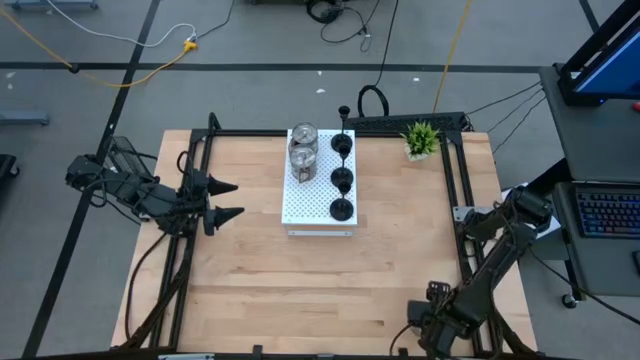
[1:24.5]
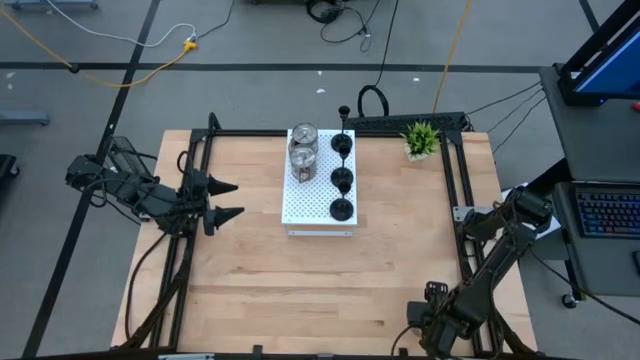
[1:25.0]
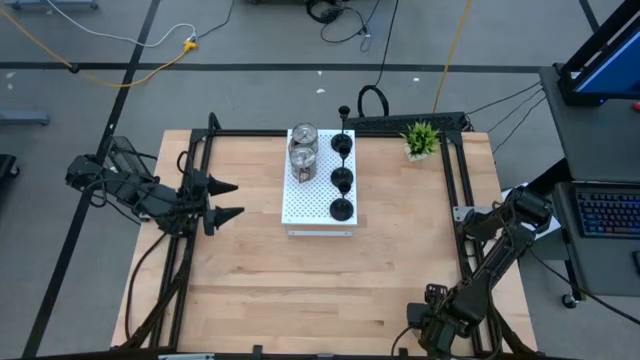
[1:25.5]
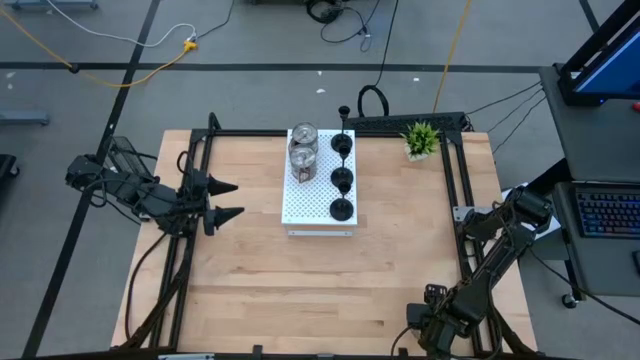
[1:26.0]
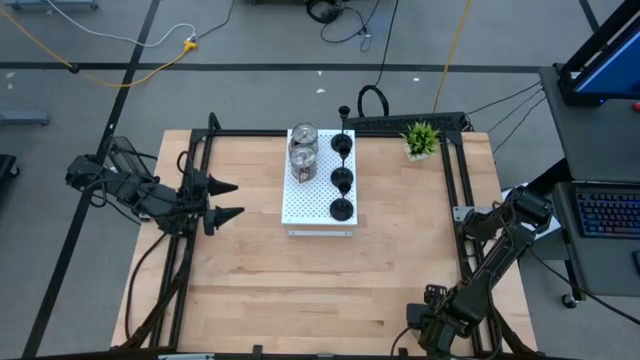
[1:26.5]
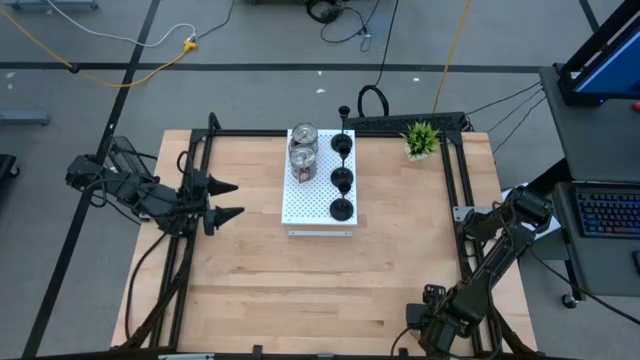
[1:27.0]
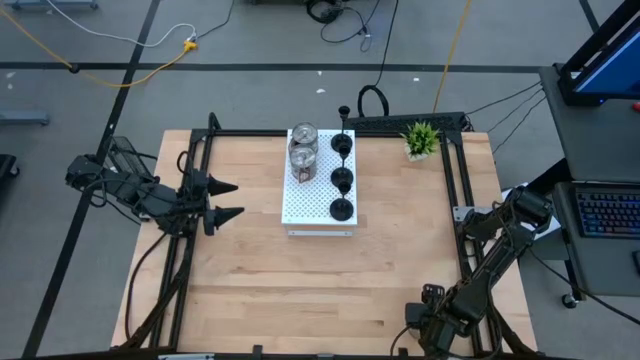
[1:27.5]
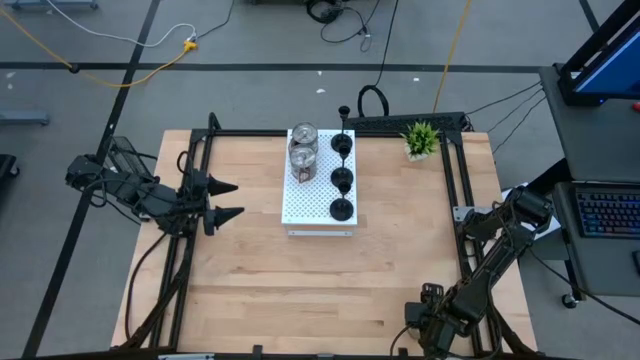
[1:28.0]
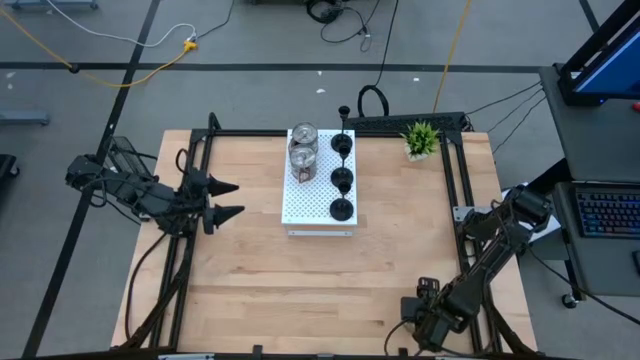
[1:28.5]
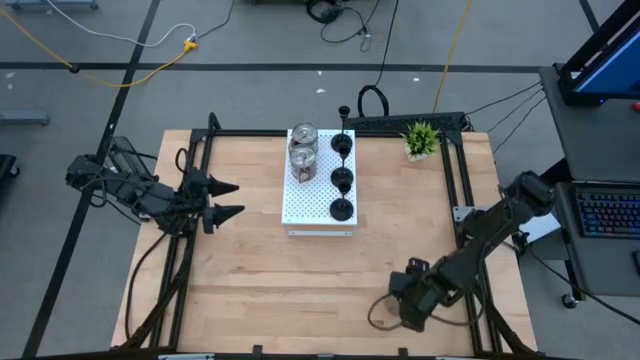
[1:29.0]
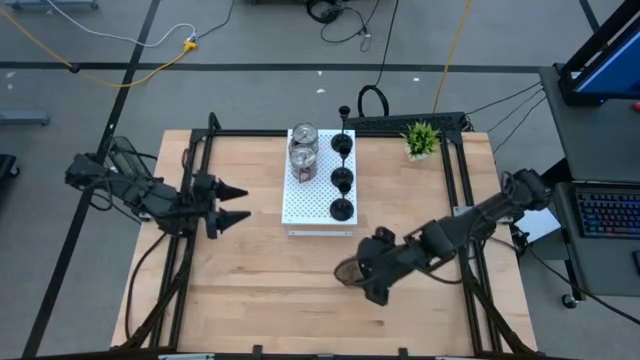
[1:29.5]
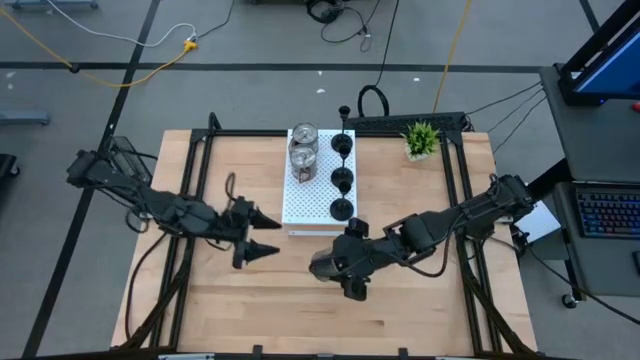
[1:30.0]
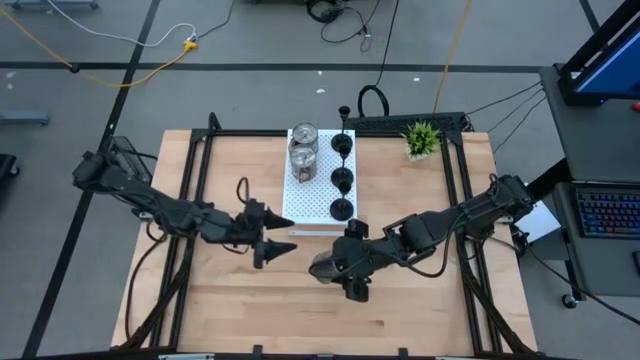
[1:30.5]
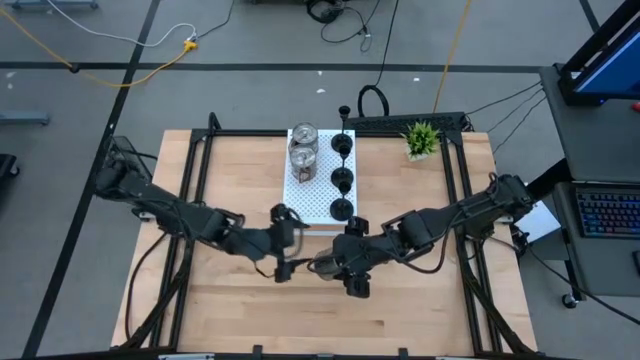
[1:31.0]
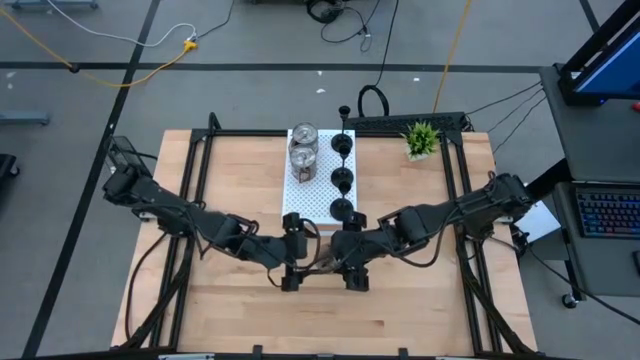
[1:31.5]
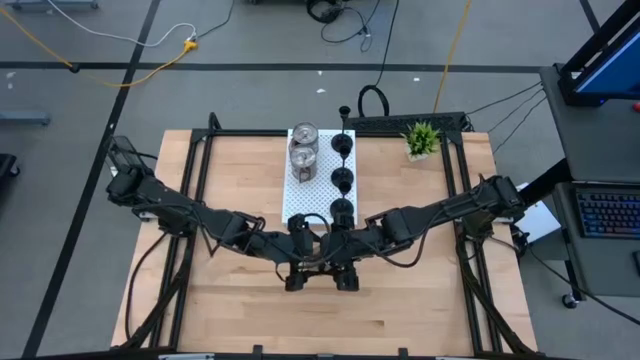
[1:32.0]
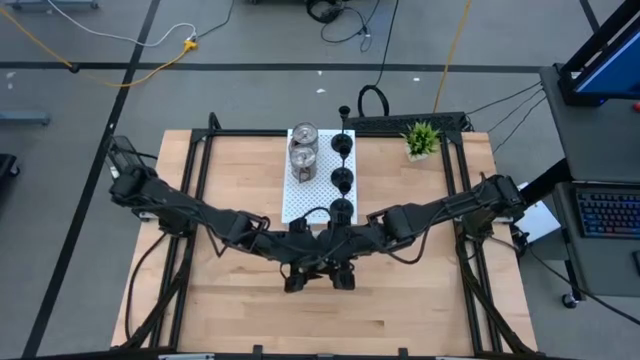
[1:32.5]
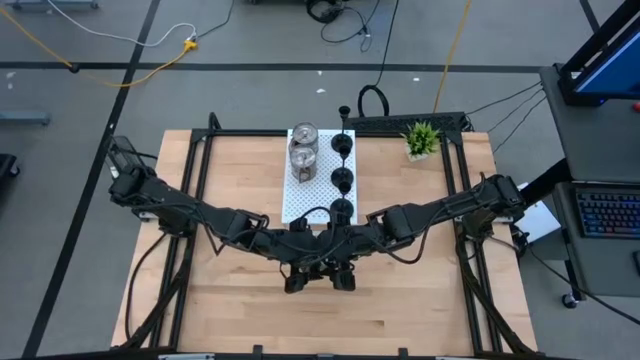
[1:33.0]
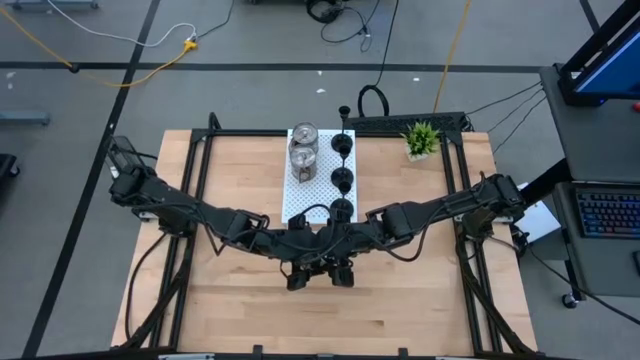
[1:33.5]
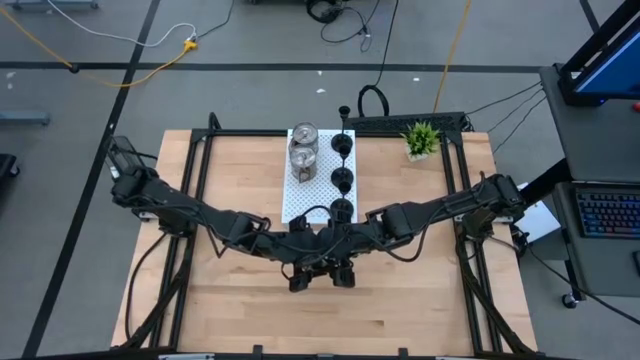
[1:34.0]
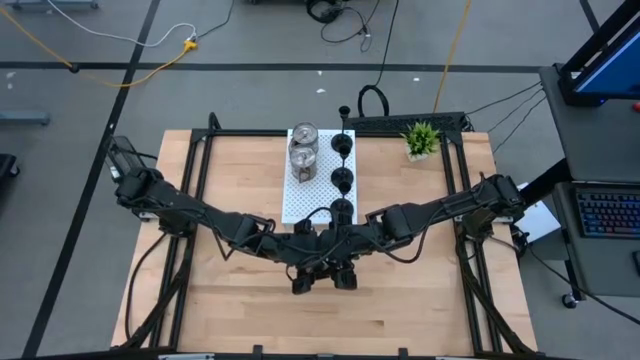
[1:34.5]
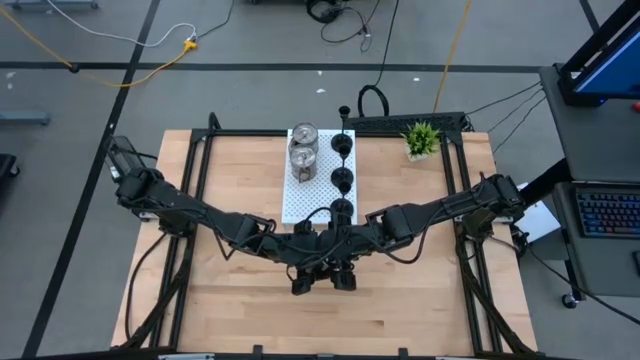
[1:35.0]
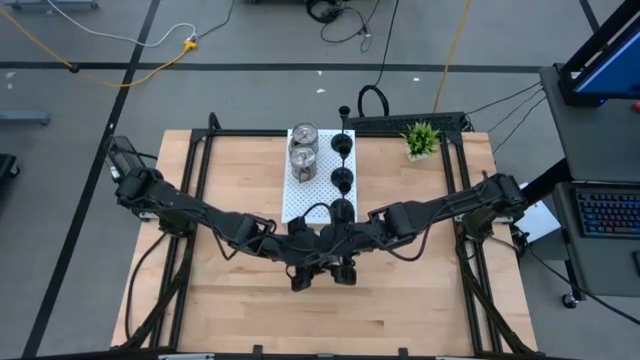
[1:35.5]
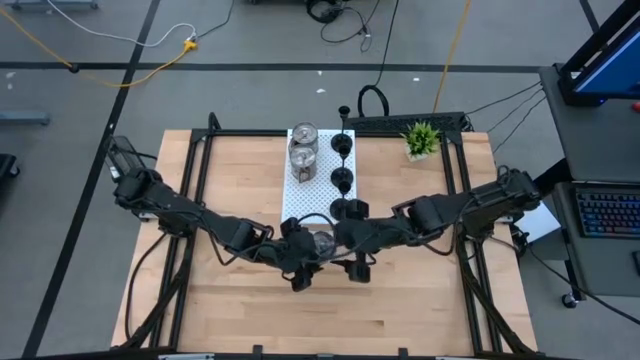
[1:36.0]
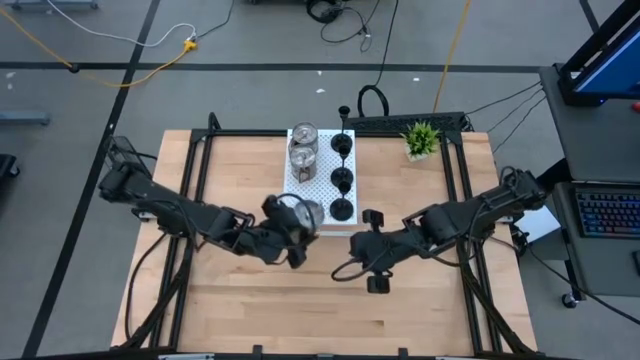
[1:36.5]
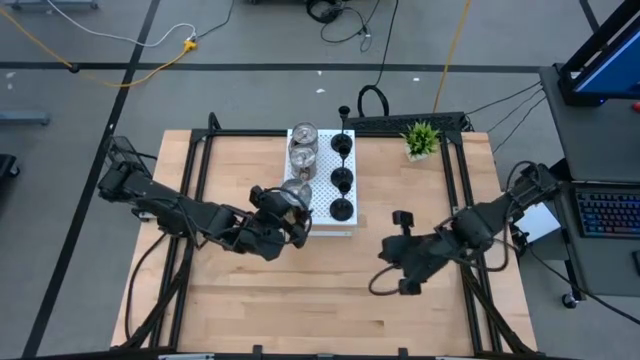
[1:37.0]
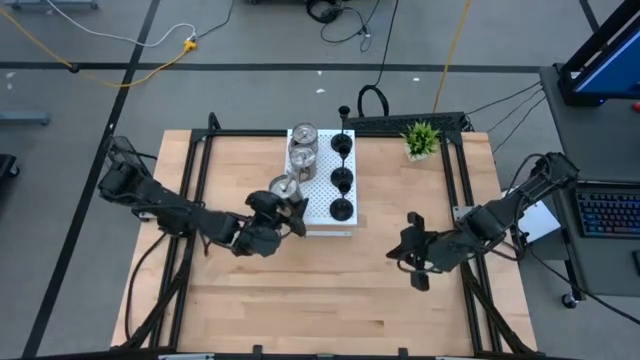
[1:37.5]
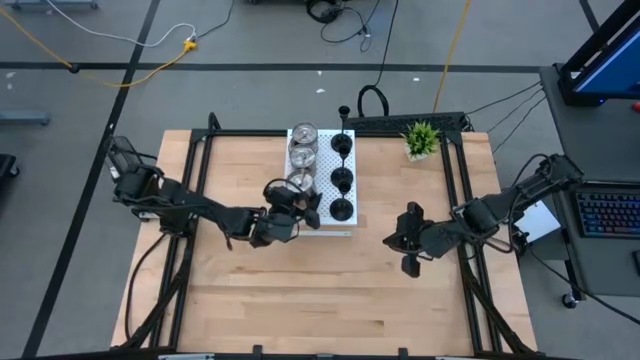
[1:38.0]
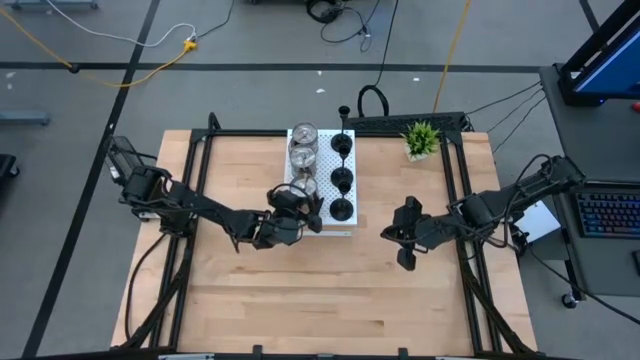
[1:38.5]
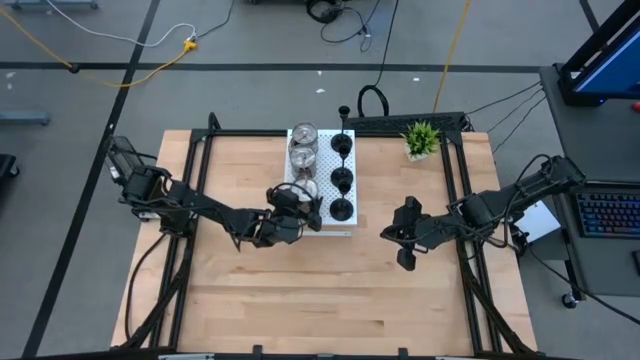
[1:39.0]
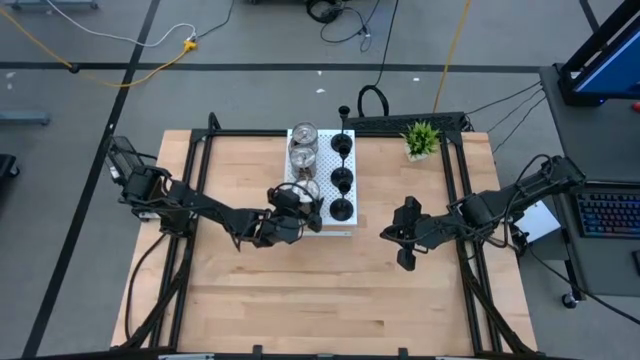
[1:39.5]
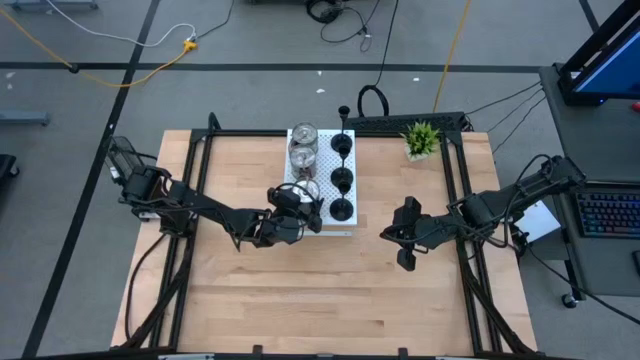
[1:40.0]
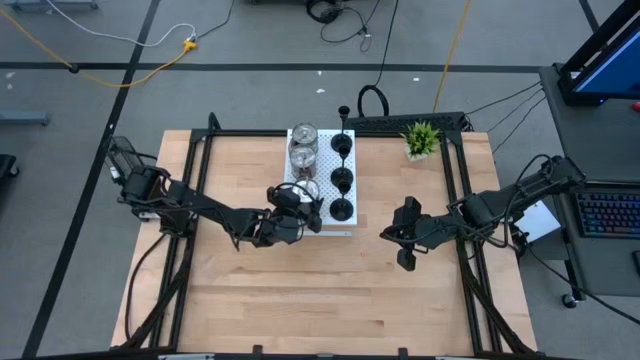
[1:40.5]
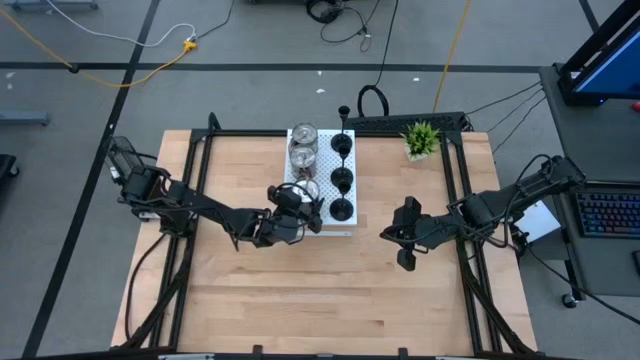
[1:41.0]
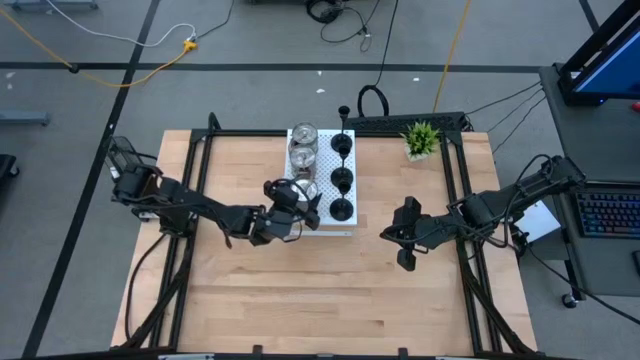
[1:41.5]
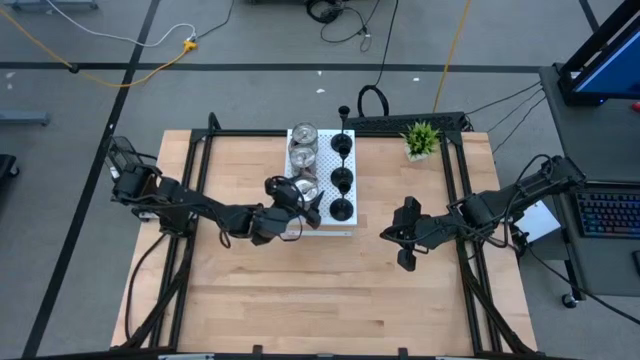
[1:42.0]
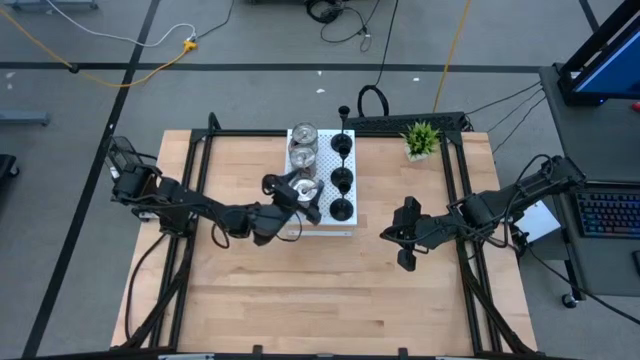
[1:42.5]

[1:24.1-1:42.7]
Task: Pick & Place candle stick holders
Put the silver scented candle on the shelf aligned with the other silver scented candles

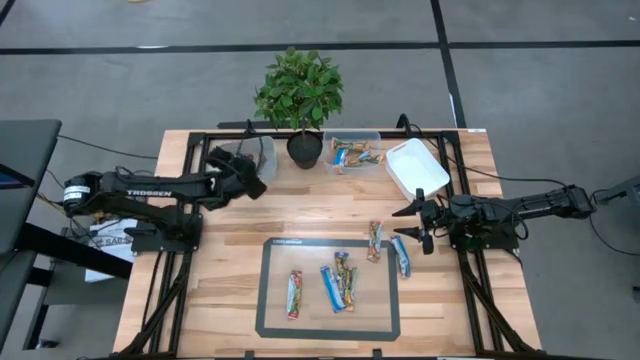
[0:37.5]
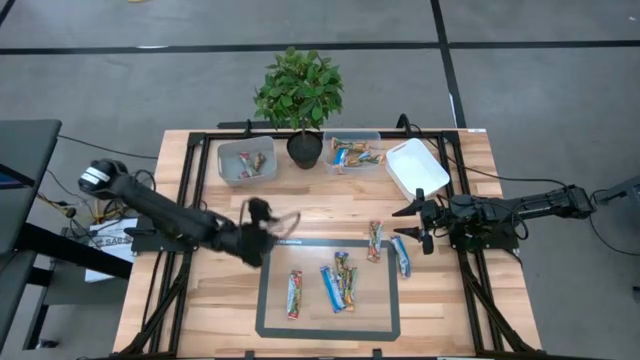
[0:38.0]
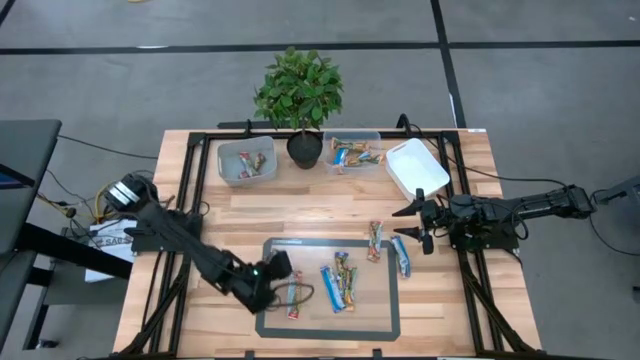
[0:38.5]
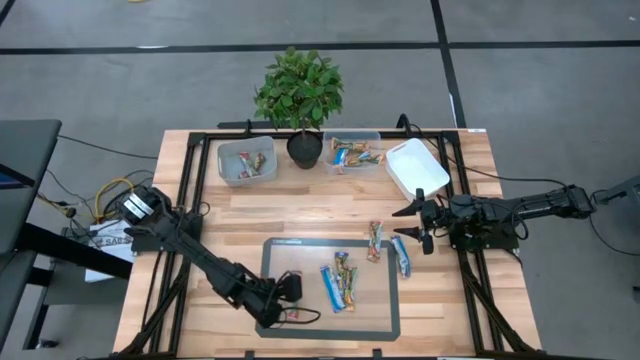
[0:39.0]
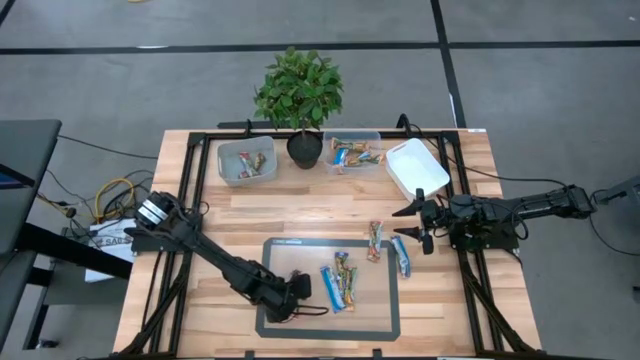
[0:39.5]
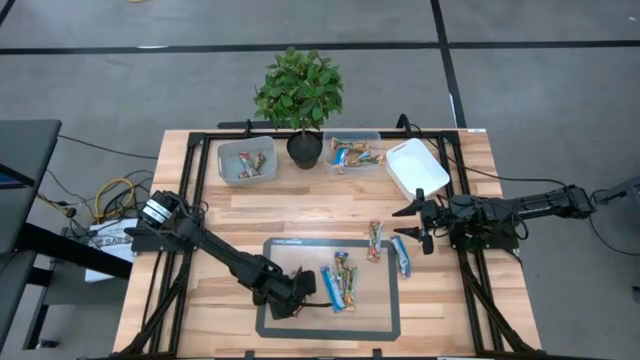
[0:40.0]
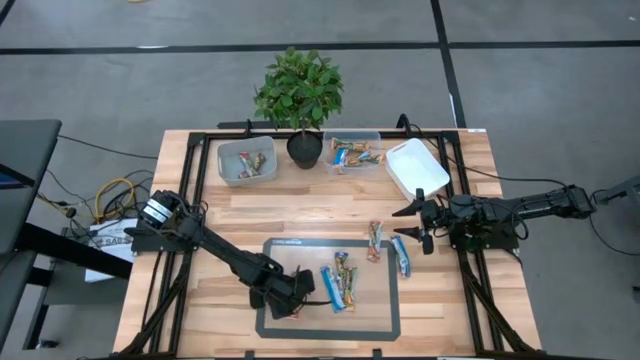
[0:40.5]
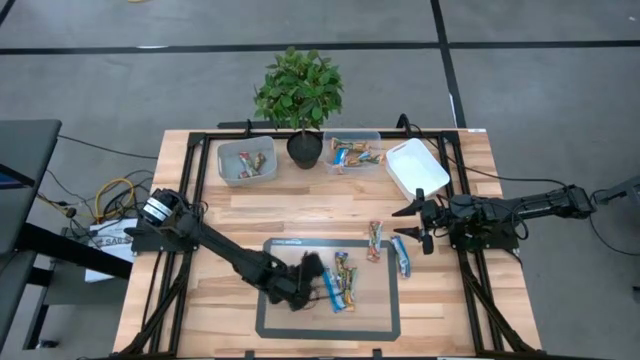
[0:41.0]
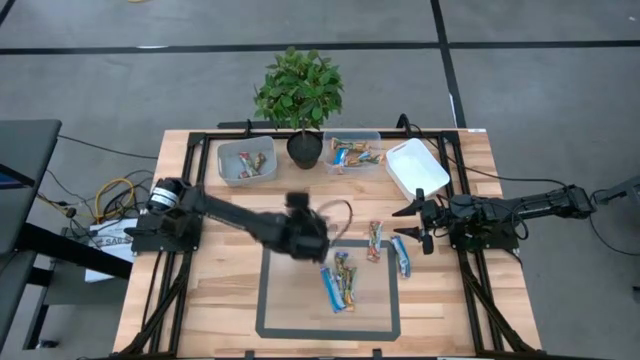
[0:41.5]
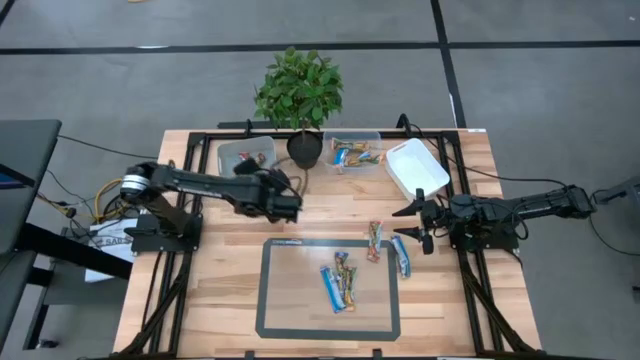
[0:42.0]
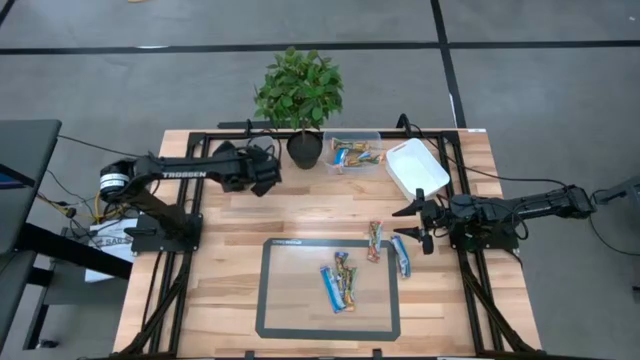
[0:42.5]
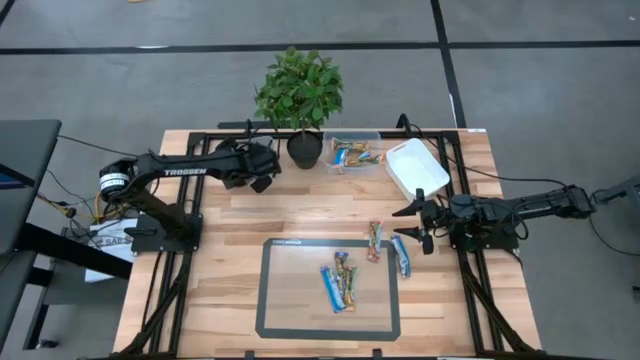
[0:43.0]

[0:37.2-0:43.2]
Task: Pick and place Granola Bars by type
Put the red granola bar into the gray bin
